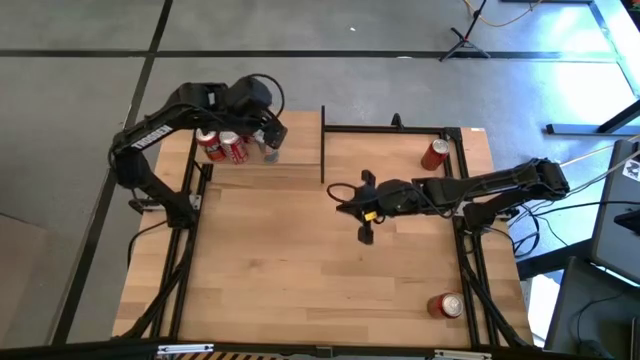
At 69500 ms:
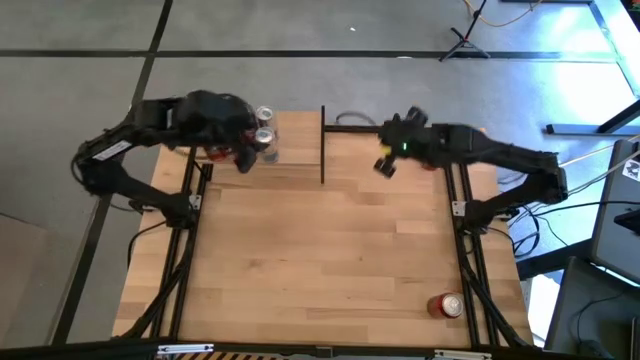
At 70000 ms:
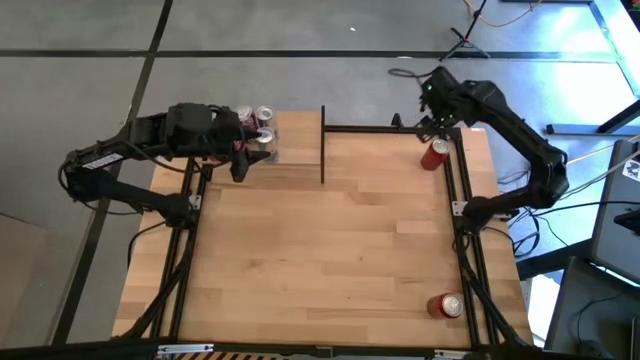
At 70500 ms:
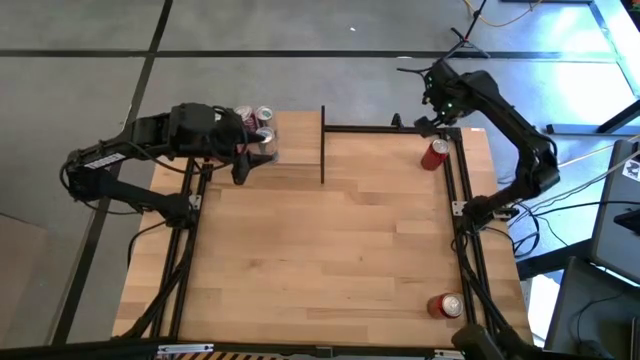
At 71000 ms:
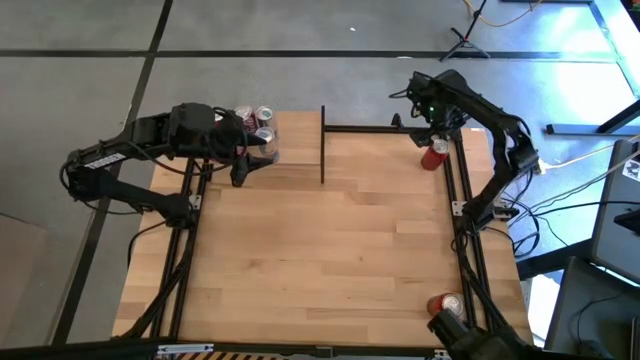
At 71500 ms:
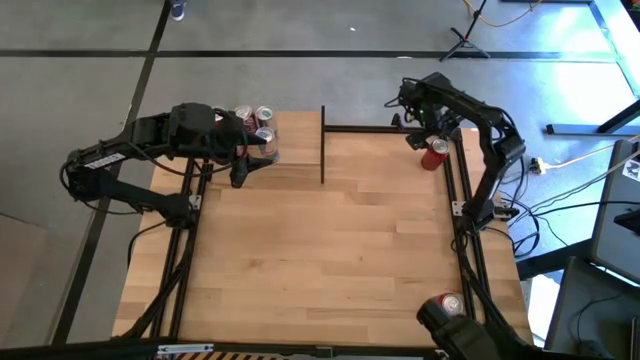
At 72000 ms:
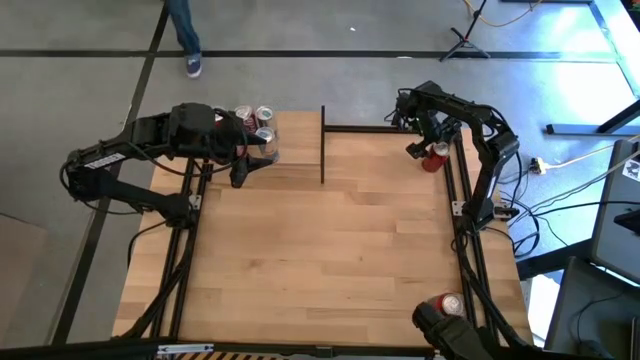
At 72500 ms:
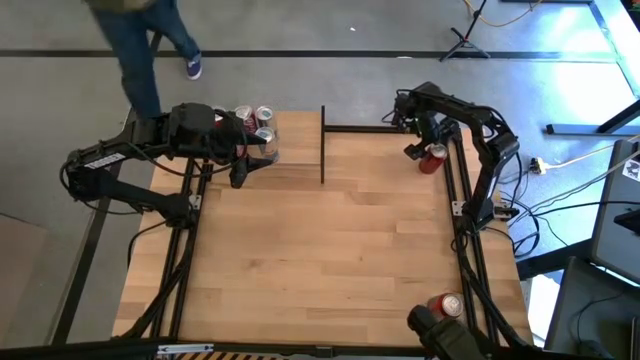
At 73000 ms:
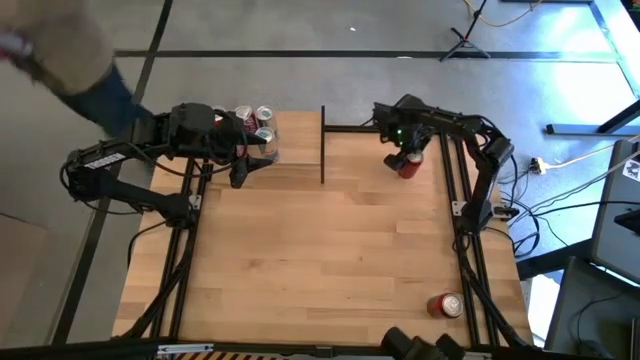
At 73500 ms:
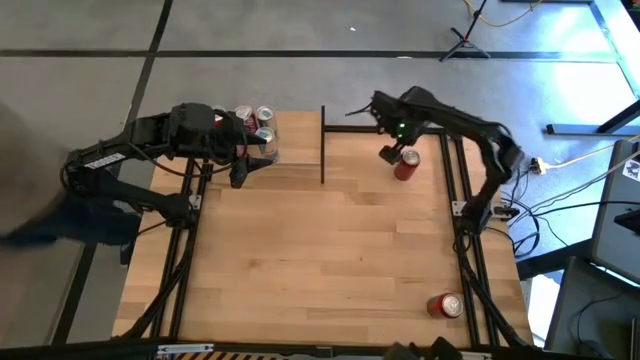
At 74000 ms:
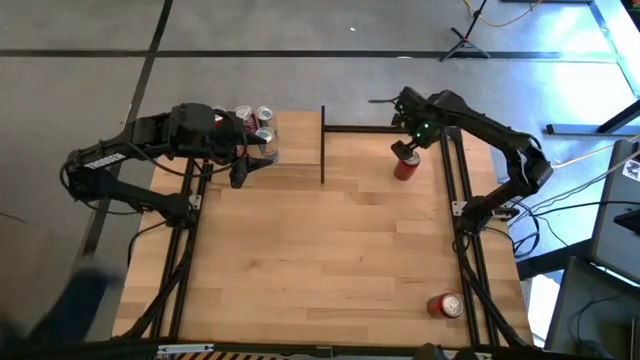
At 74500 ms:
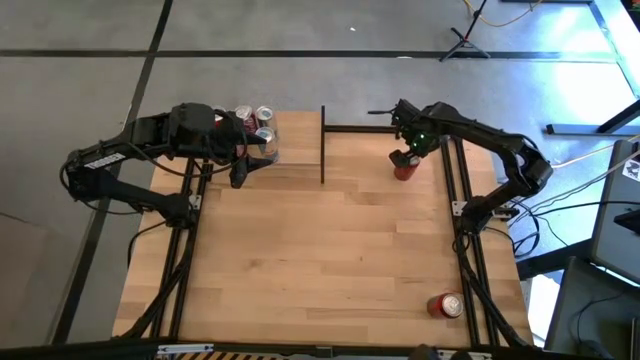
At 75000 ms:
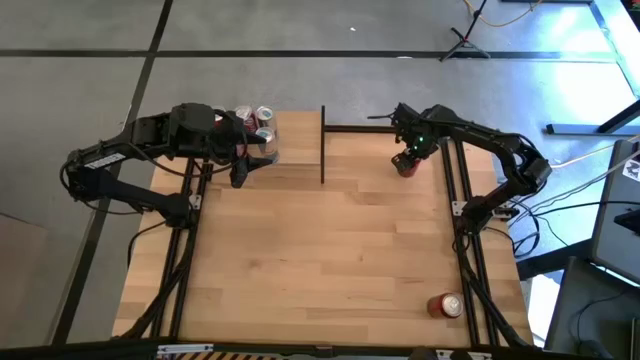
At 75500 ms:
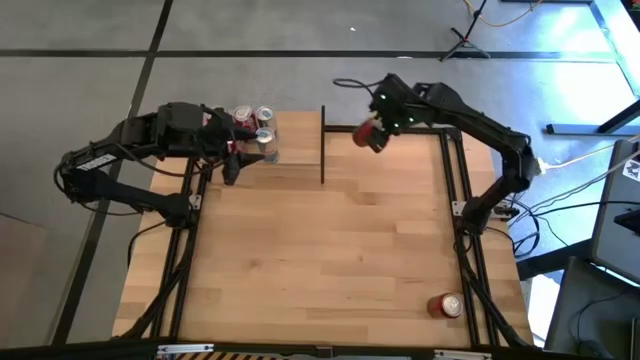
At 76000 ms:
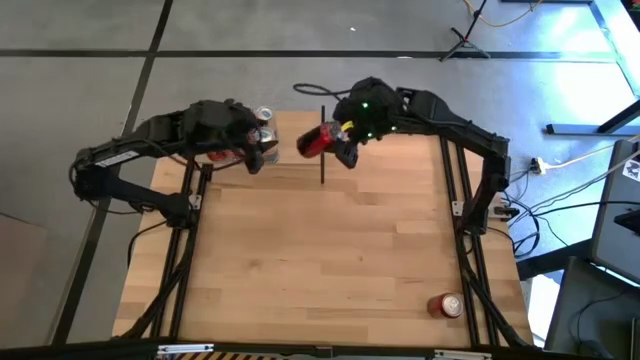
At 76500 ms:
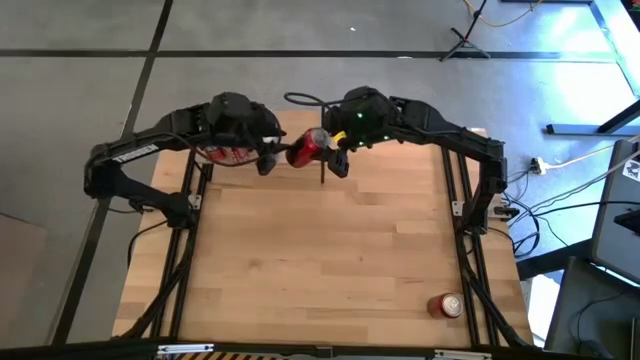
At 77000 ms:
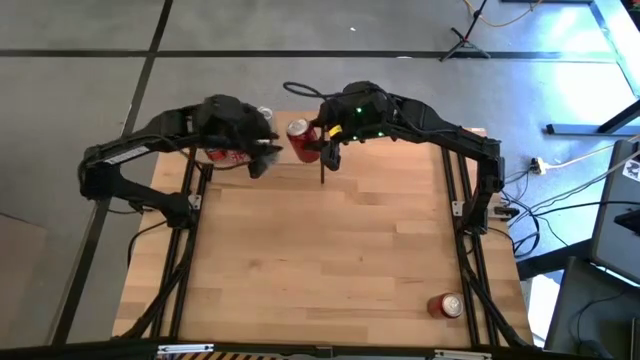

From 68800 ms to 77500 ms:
Task: Place canned beverage on shelf
Put the top red-black soda can on the shelf

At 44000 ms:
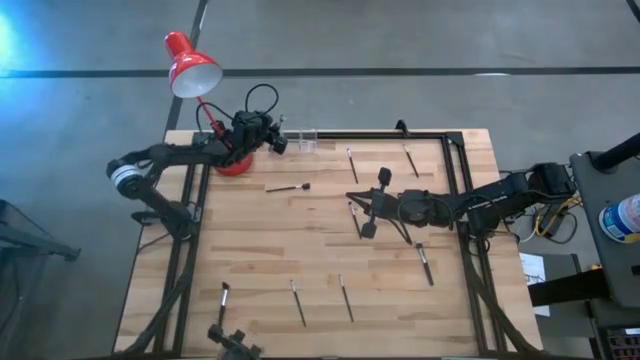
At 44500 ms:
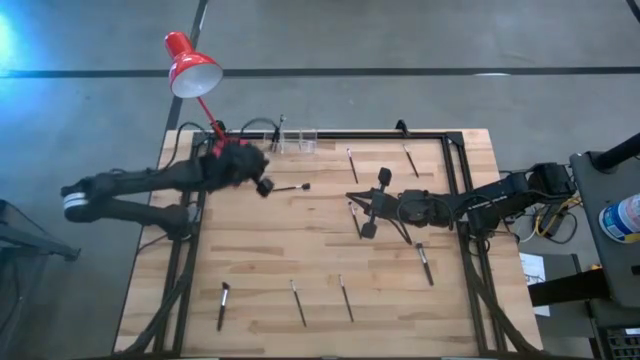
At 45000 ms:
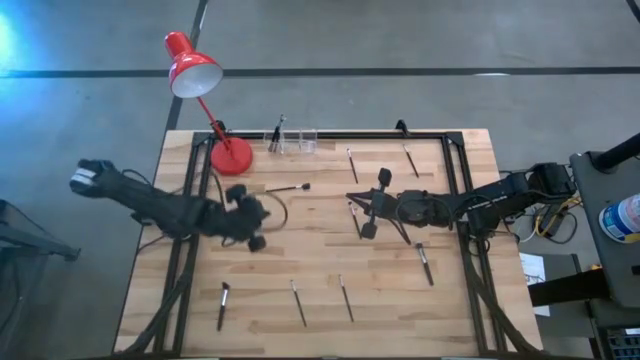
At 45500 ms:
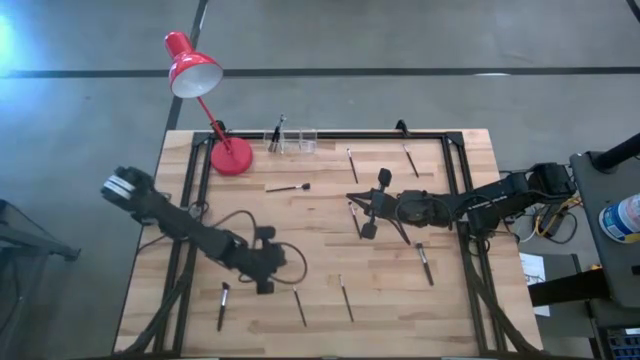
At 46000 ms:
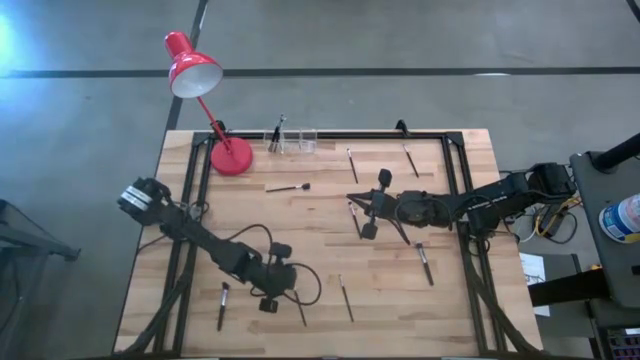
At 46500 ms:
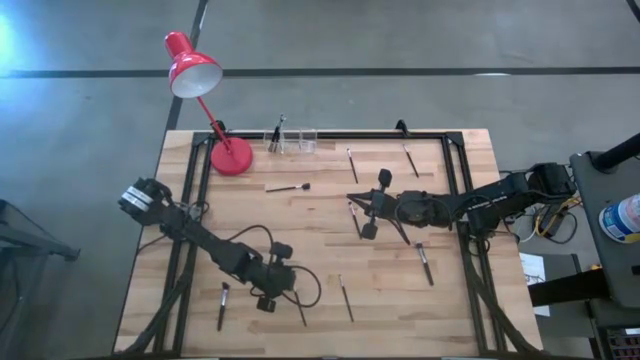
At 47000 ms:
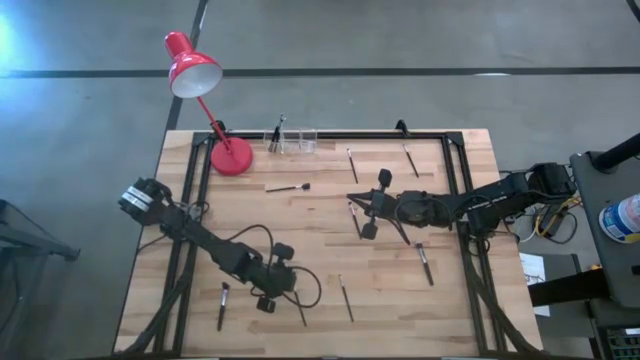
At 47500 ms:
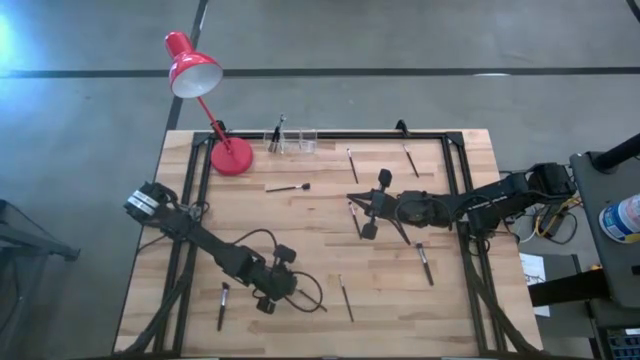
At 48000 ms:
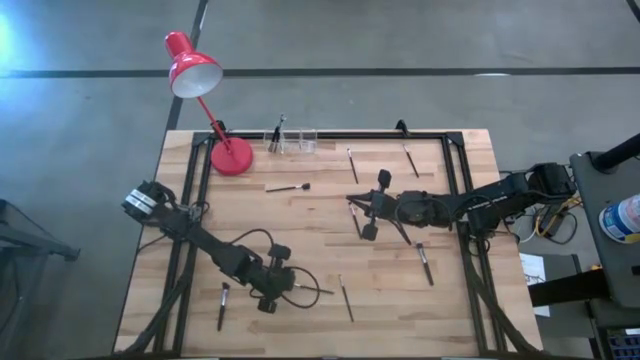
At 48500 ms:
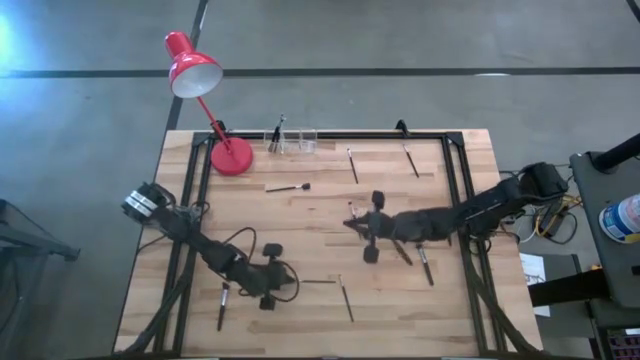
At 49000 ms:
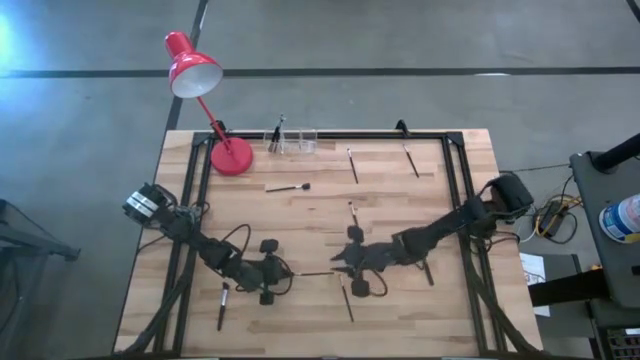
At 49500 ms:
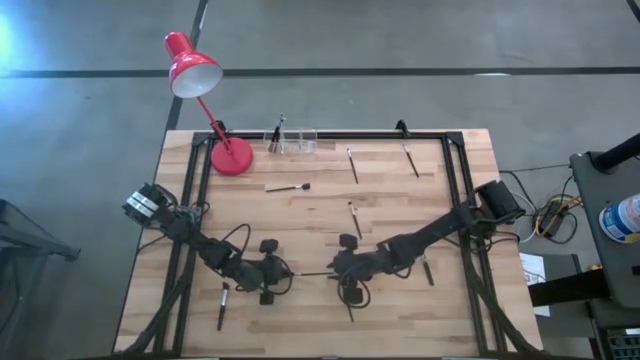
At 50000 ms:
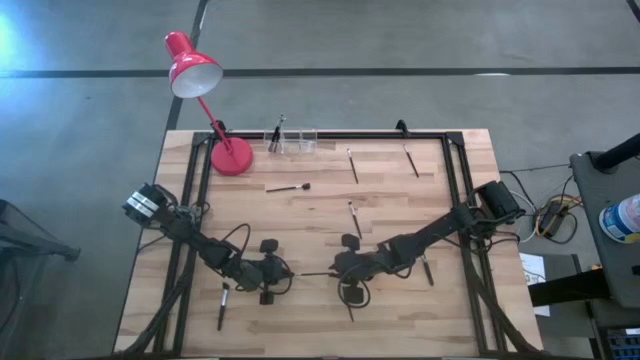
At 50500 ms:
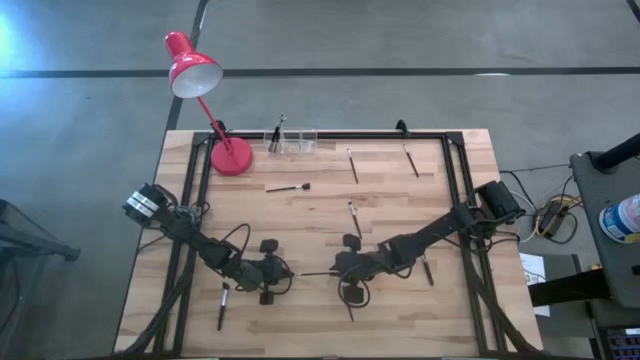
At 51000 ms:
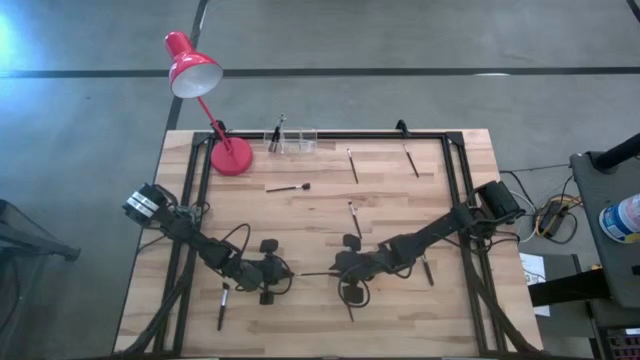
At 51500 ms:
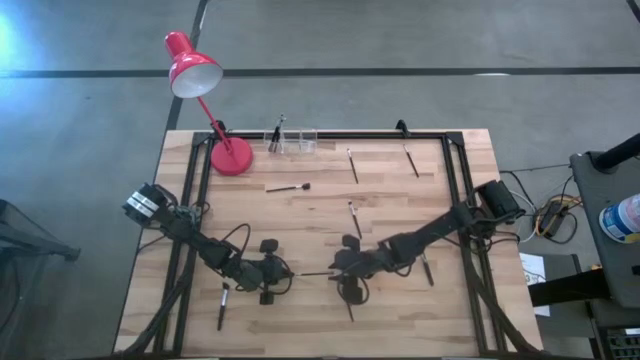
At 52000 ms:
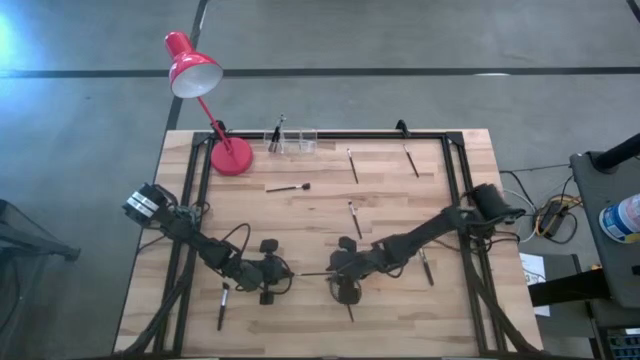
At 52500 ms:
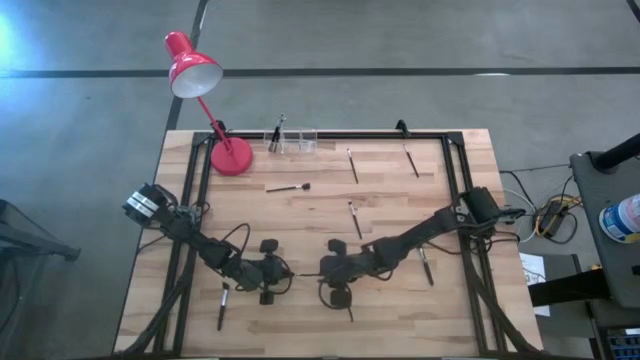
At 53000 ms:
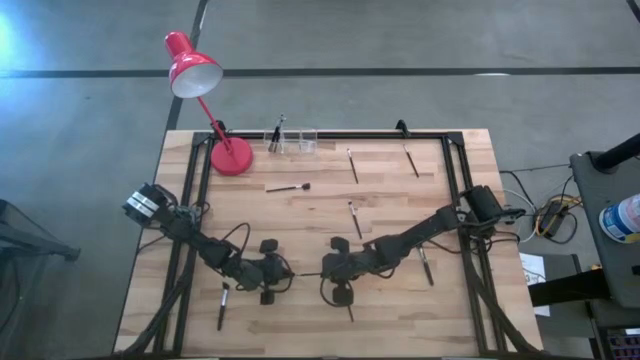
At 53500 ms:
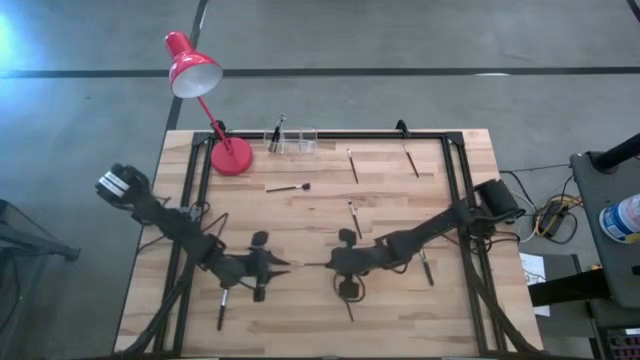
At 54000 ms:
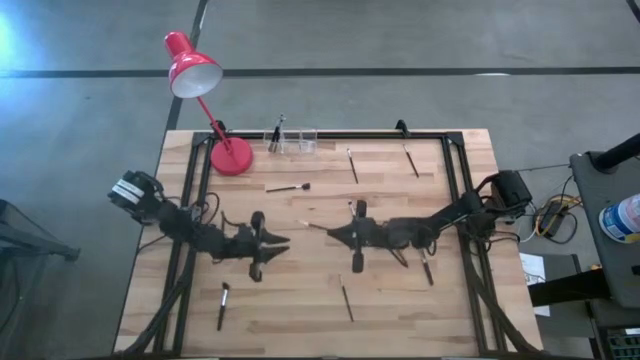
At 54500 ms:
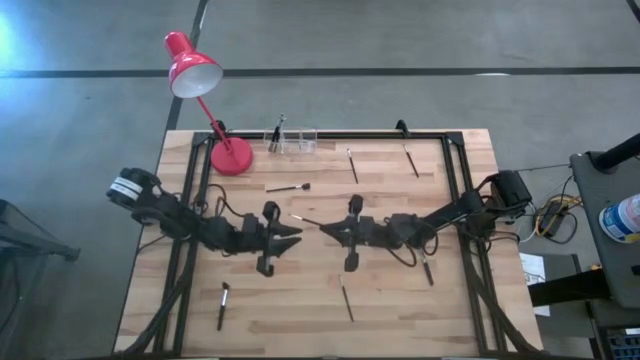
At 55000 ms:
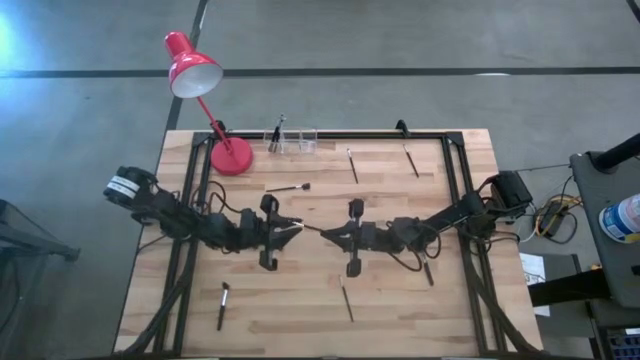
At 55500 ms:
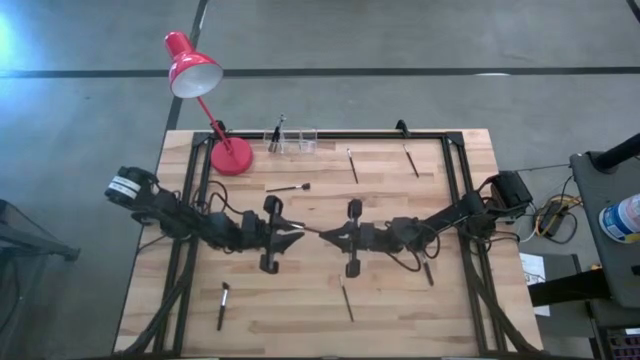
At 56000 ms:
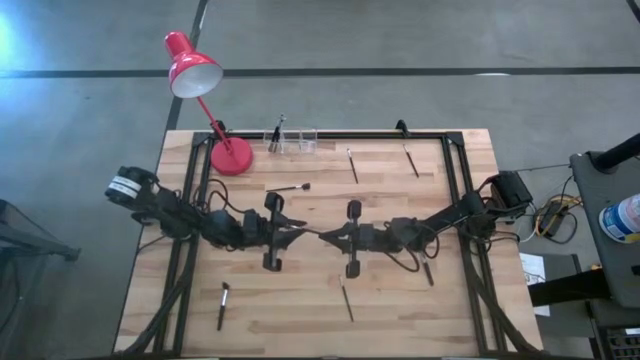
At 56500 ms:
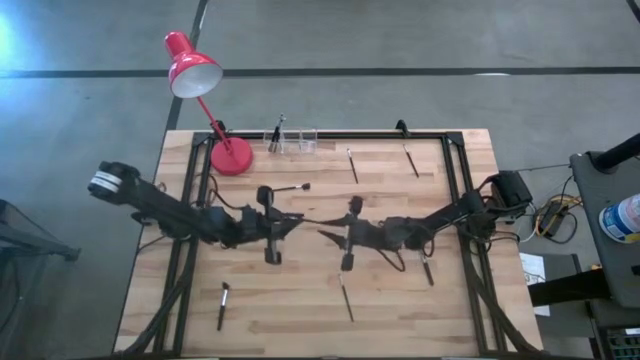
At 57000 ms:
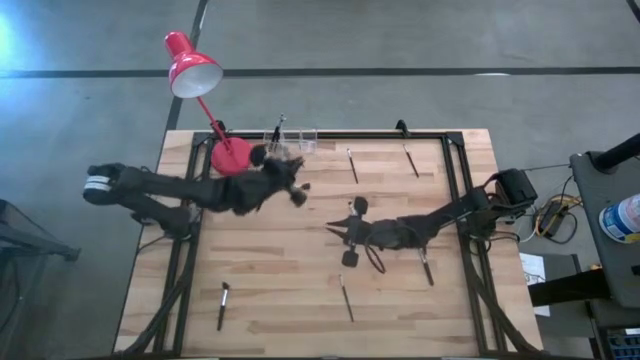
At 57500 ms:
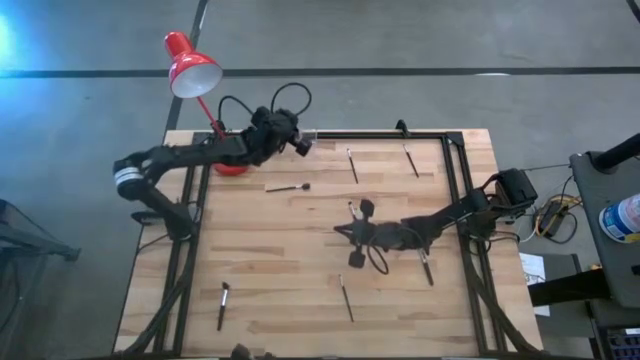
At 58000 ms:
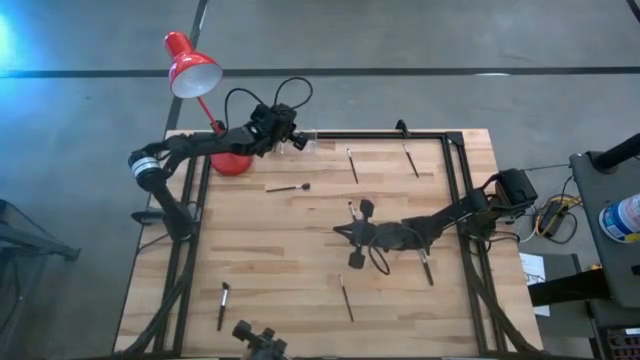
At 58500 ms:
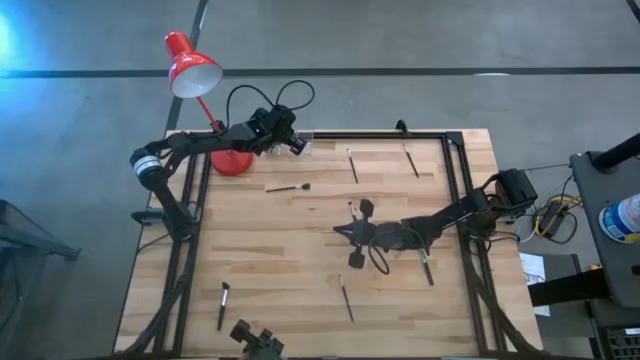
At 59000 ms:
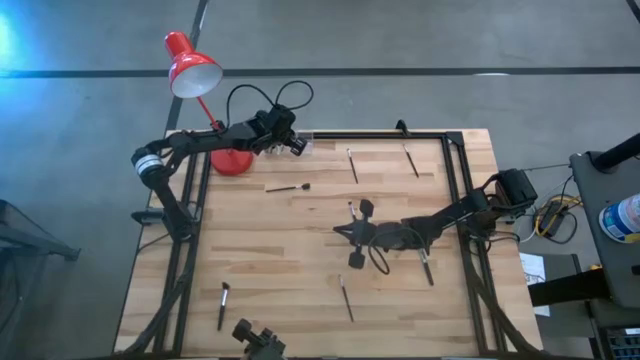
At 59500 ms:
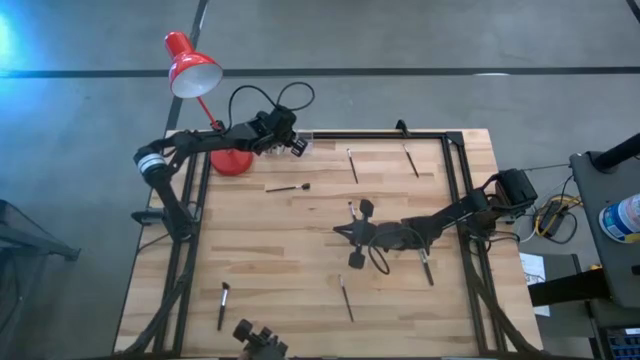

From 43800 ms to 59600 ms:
Task: Pick & Place Makeup Supplies
Put the makeup brush into the transparent organizer
